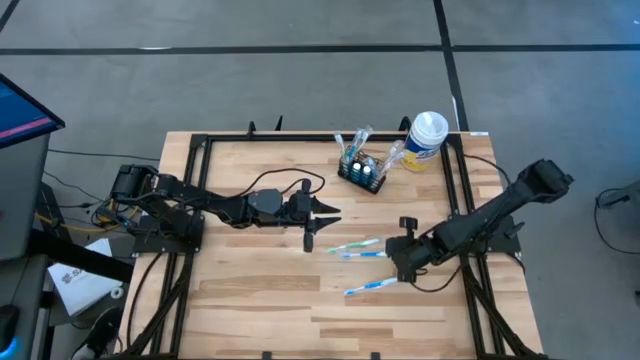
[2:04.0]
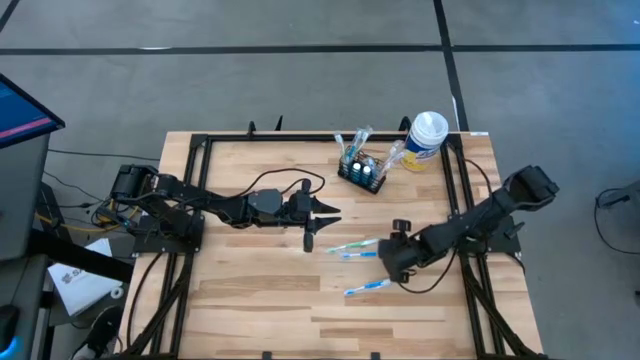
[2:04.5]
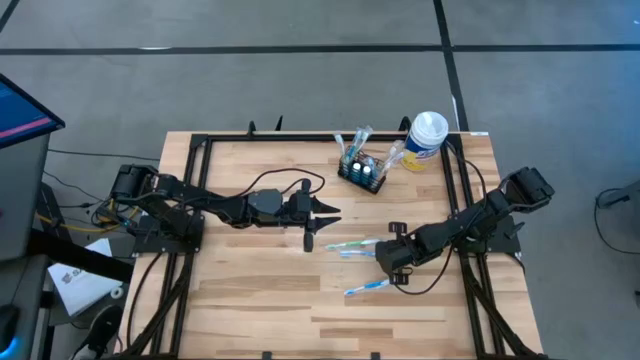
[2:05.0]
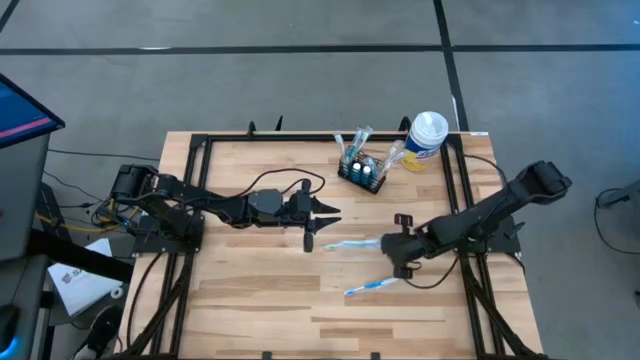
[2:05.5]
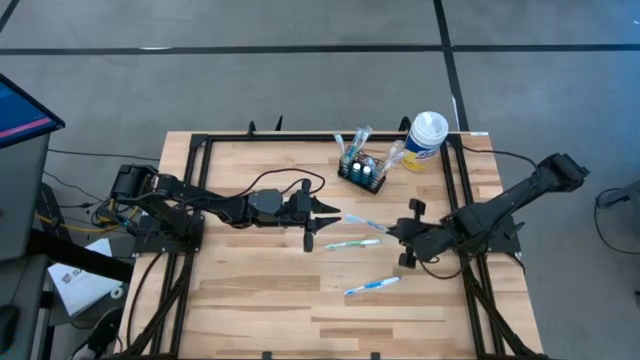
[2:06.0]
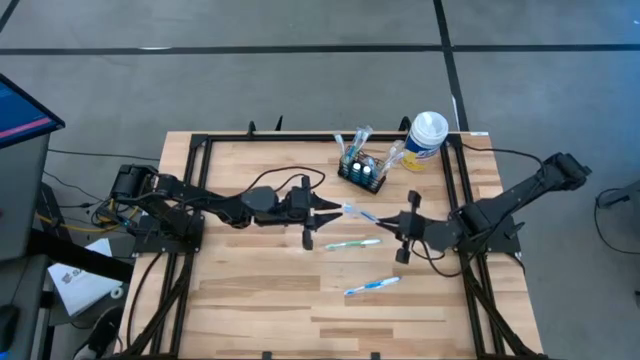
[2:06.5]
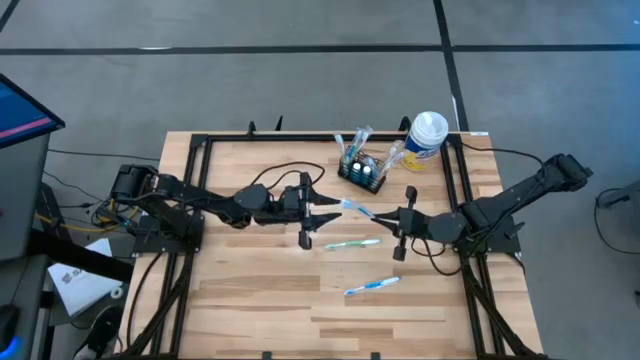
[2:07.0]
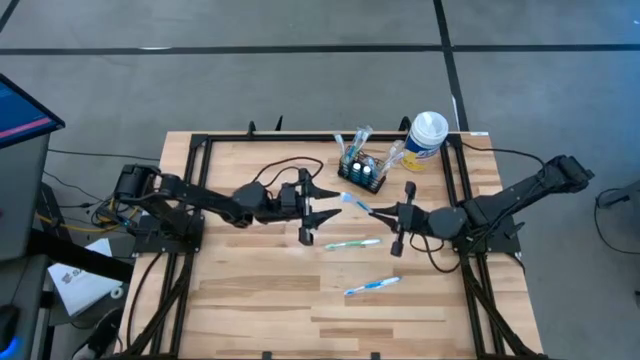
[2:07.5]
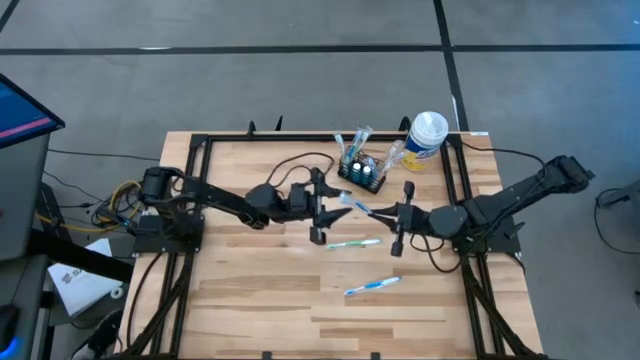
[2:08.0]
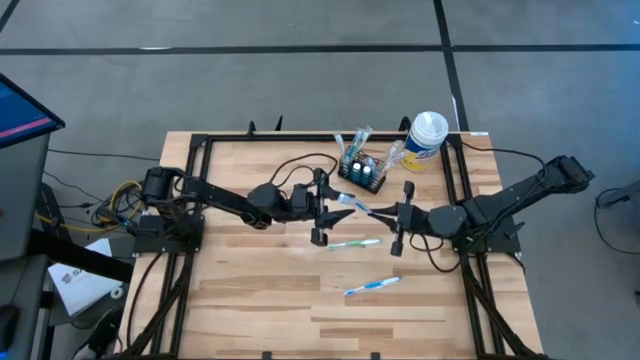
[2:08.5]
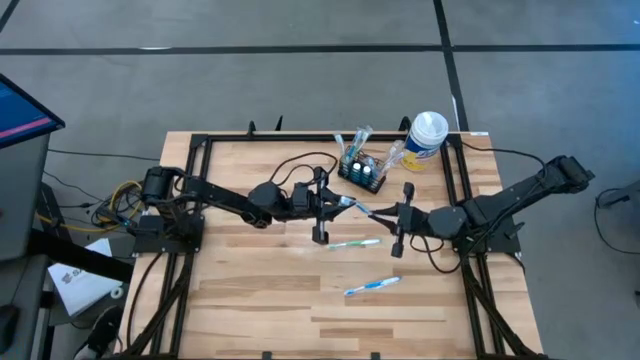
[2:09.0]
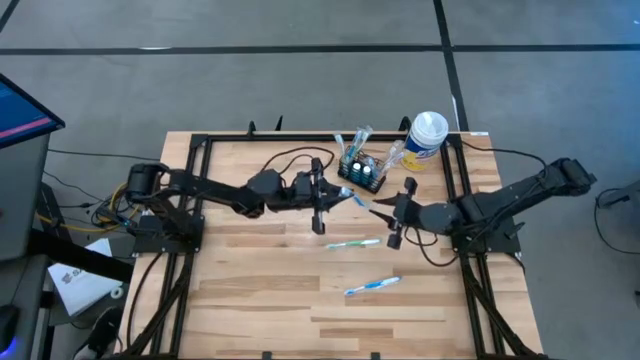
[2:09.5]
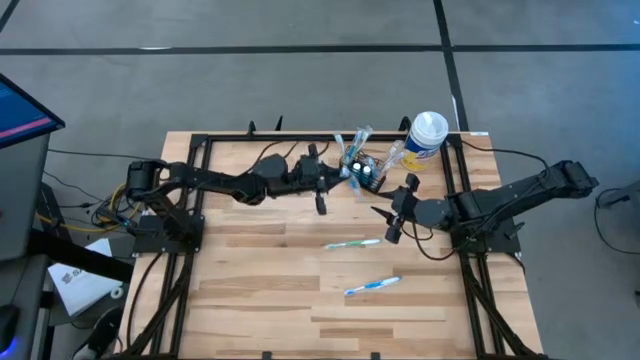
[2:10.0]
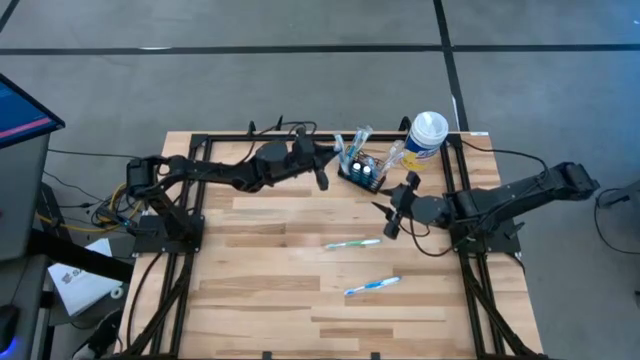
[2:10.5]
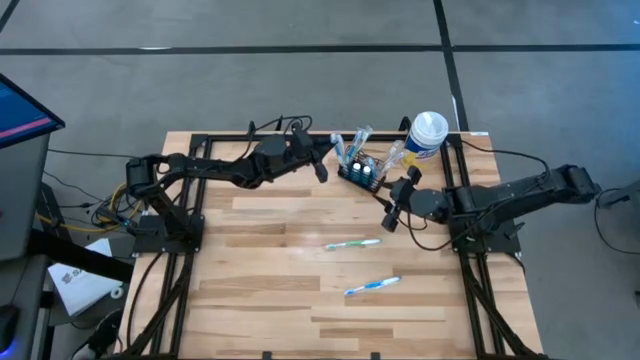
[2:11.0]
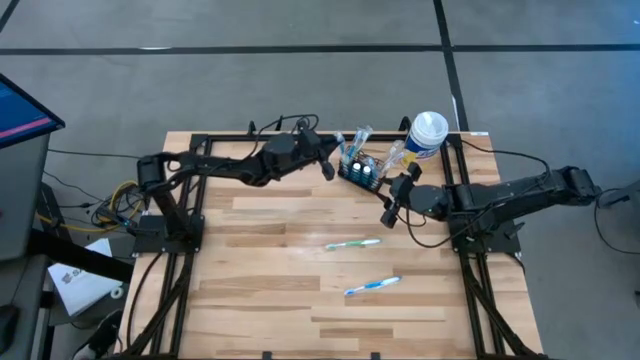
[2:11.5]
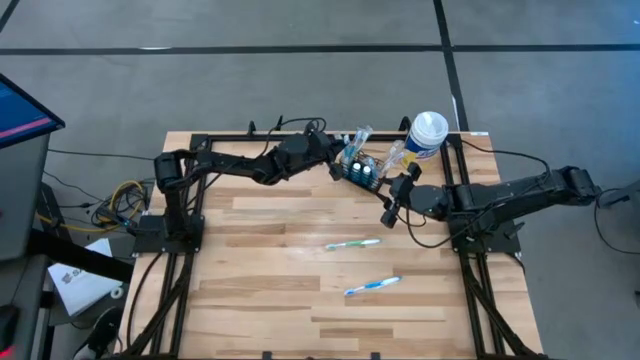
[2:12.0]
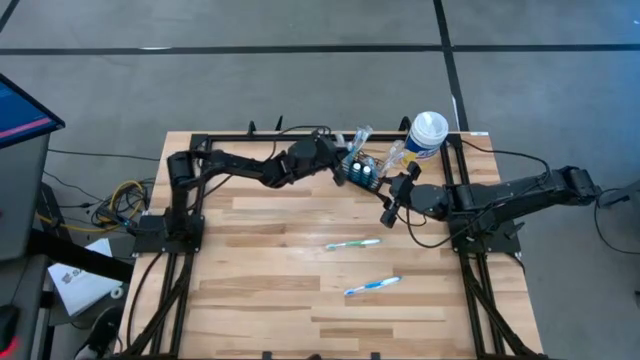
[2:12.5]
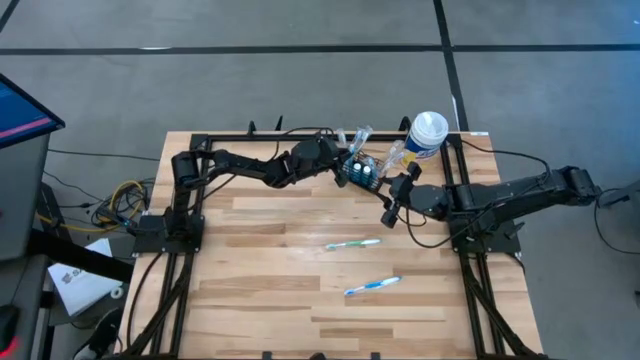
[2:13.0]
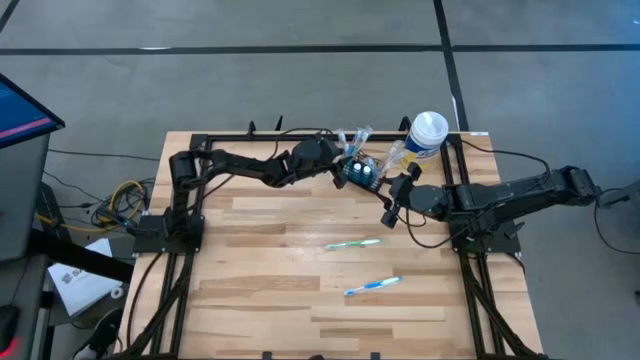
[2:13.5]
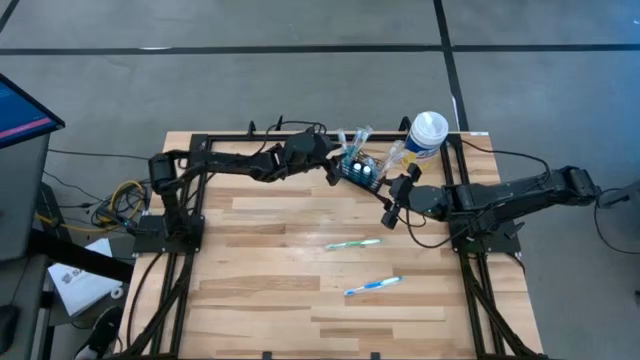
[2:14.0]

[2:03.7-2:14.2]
Task: Pick & Place toothbrushing station
Put the blue toothbrush into the mesh organizer

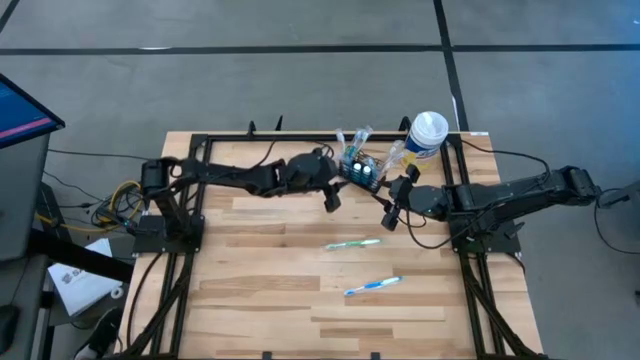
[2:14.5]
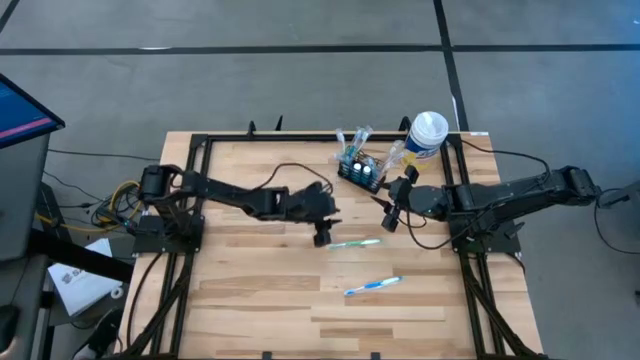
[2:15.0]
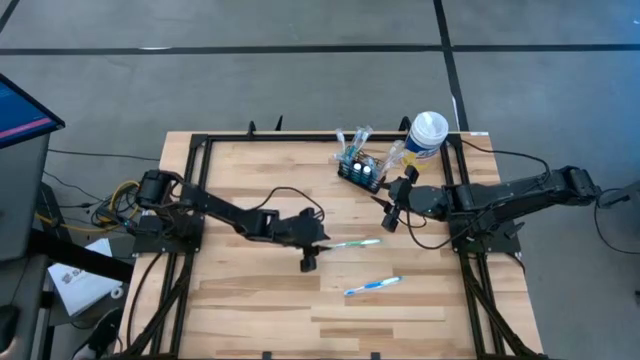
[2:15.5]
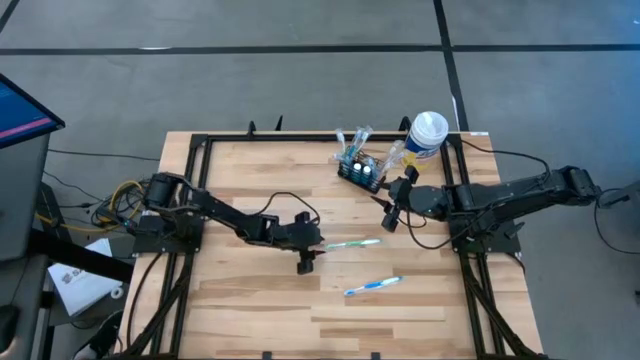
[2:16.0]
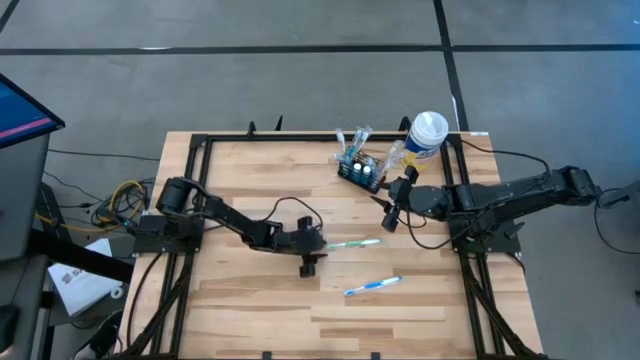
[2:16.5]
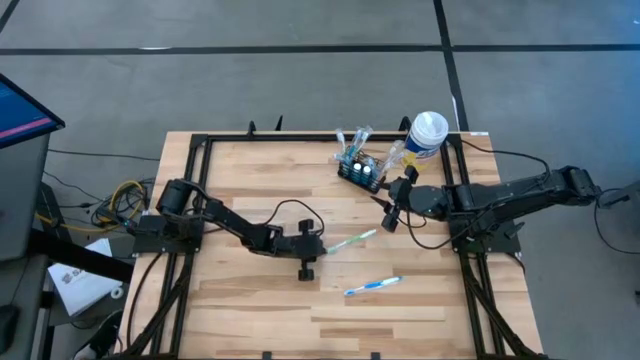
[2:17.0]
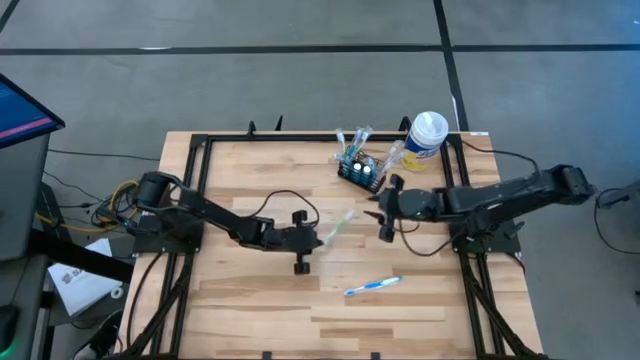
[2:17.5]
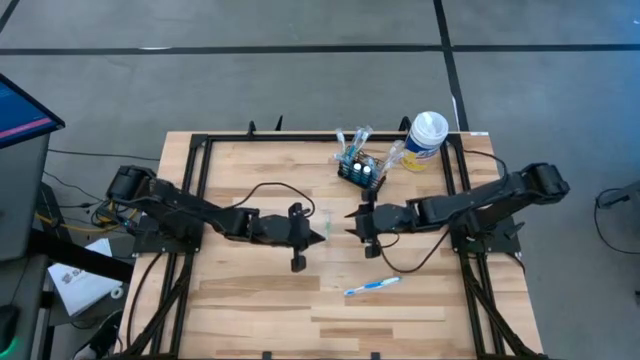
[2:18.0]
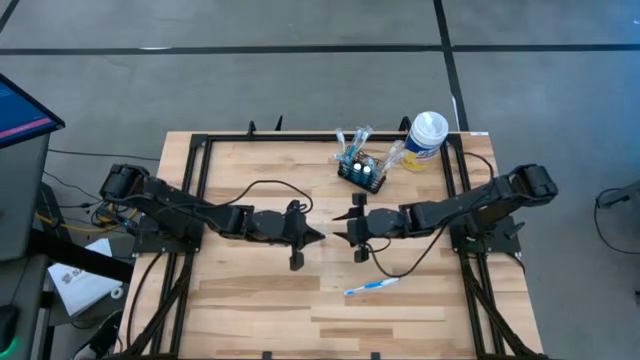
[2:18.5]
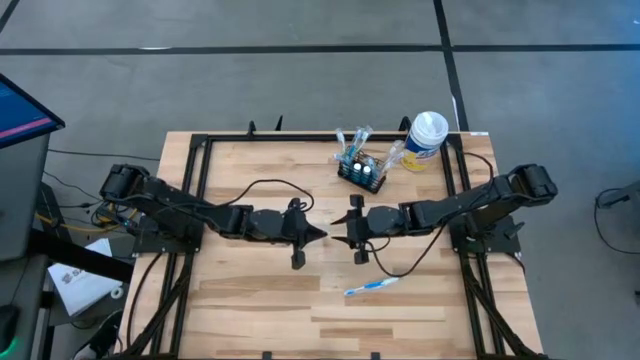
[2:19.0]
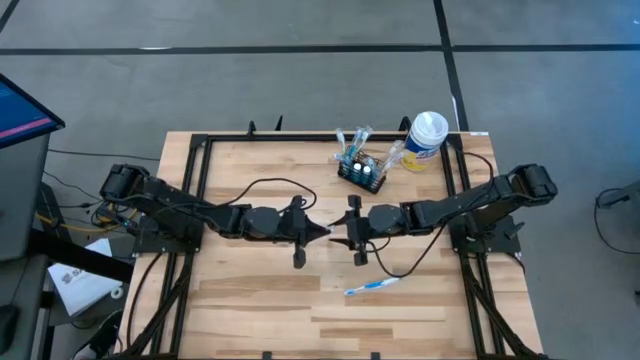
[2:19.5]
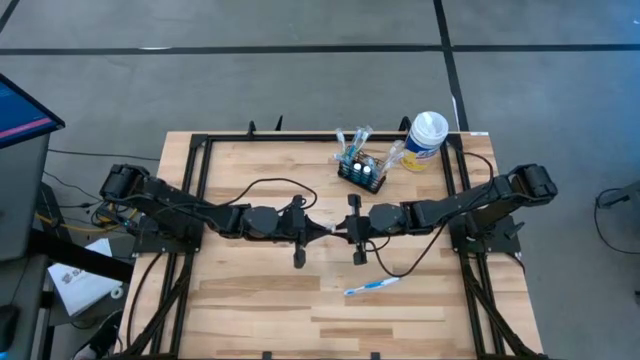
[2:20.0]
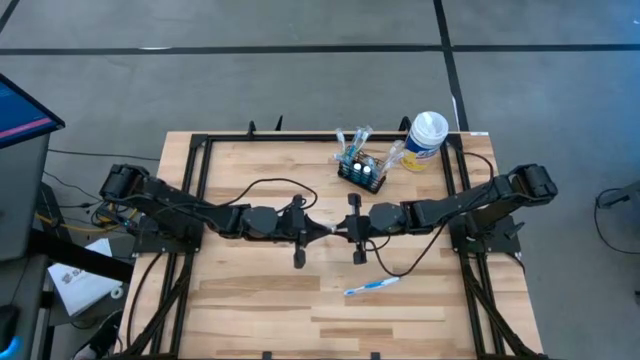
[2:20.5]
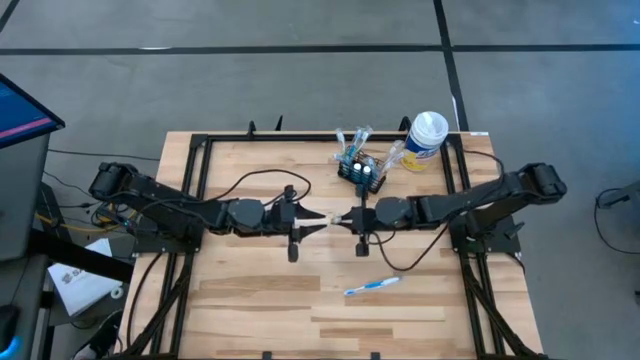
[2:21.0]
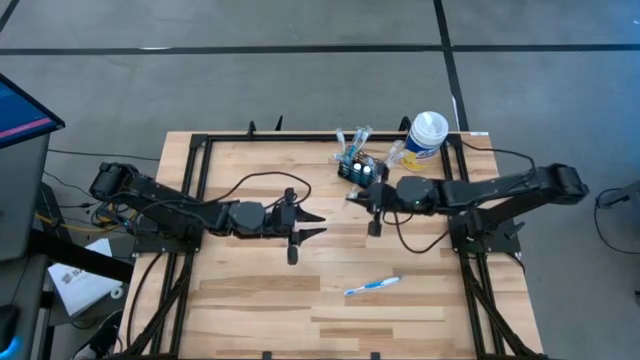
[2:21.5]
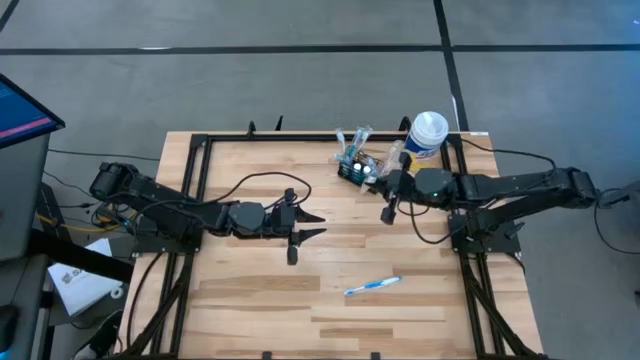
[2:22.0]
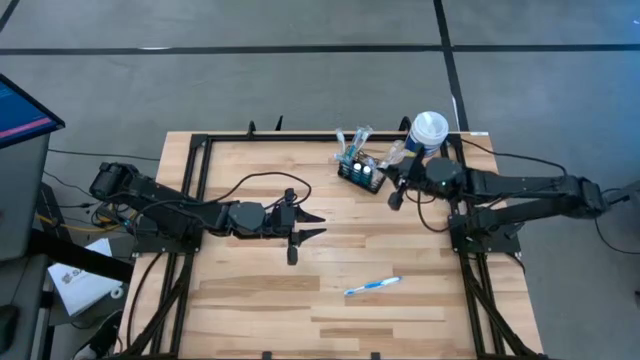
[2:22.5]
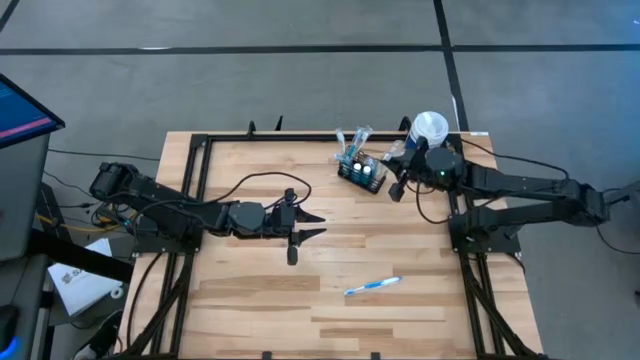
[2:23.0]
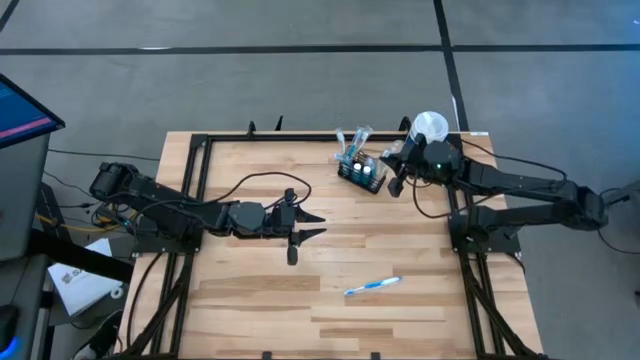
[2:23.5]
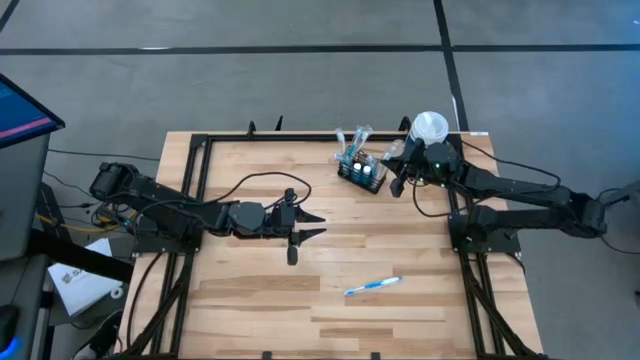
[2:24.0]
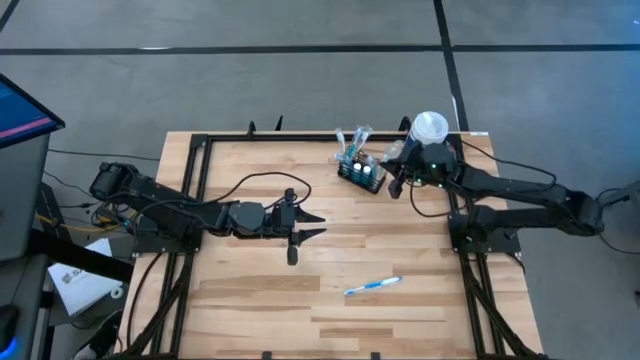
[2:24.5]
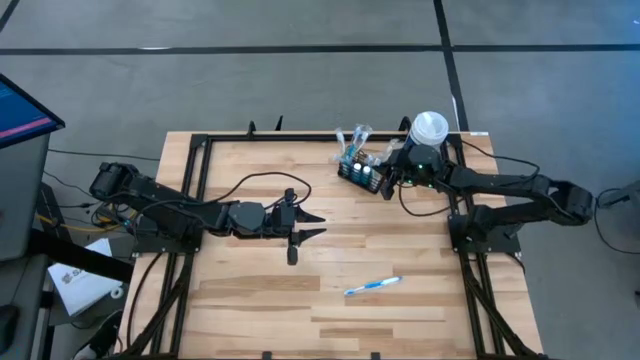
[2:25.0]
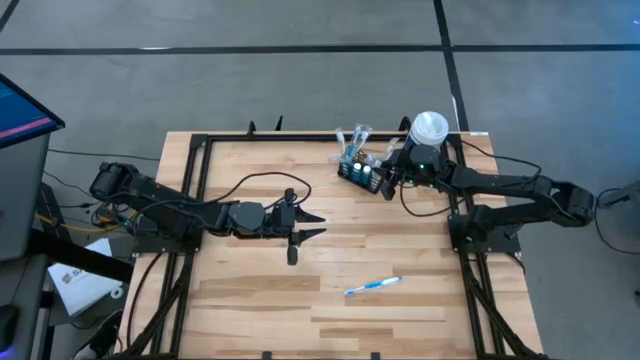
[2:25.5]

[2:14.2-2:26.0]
Put the green toothbrush into the mesh organizer
